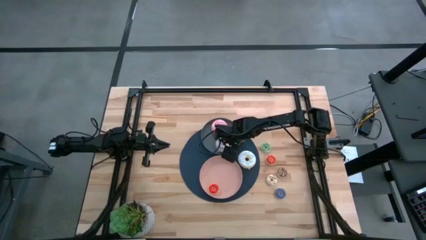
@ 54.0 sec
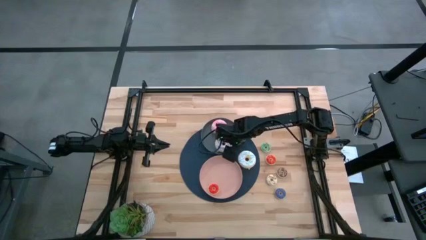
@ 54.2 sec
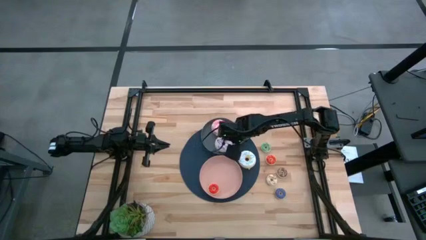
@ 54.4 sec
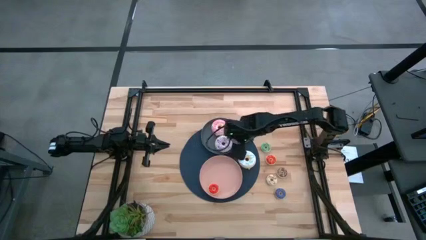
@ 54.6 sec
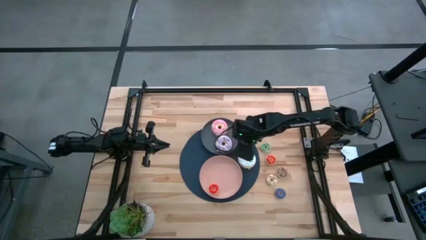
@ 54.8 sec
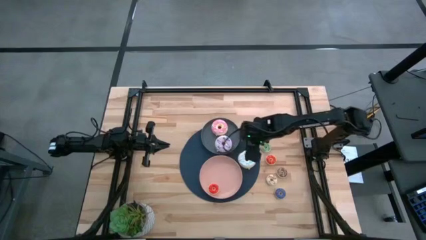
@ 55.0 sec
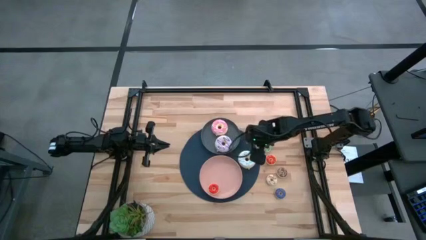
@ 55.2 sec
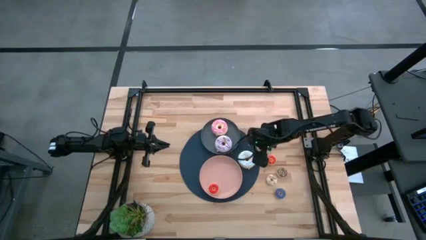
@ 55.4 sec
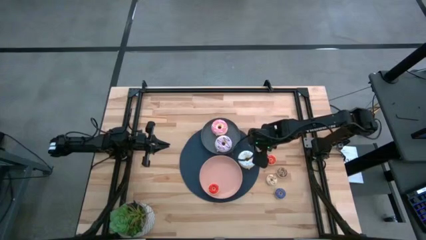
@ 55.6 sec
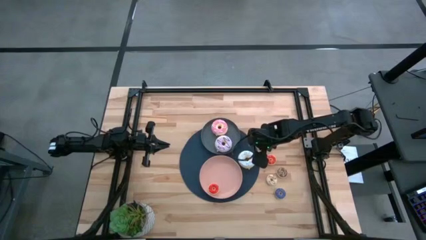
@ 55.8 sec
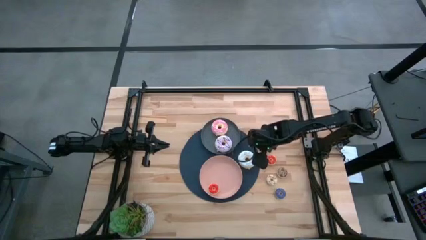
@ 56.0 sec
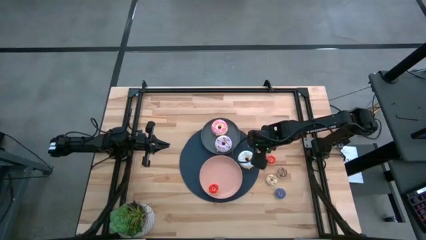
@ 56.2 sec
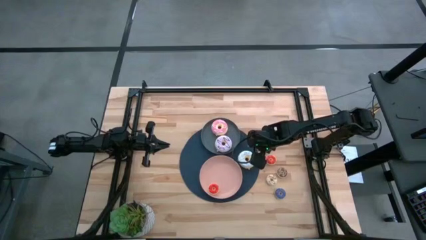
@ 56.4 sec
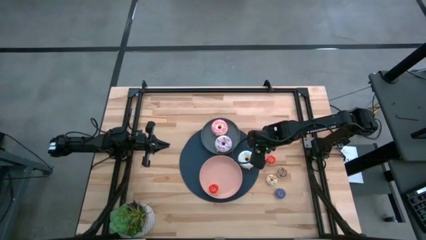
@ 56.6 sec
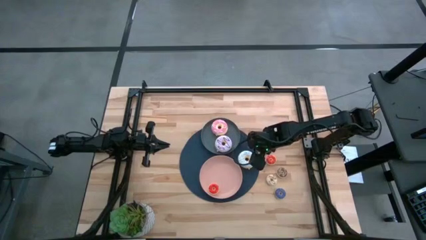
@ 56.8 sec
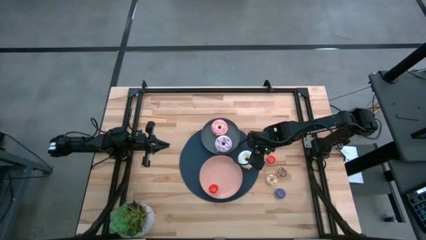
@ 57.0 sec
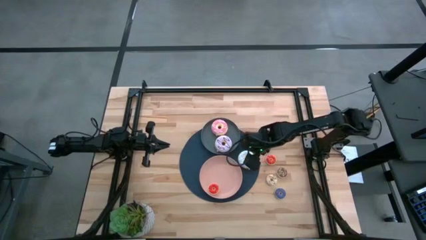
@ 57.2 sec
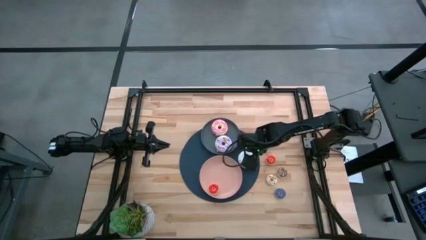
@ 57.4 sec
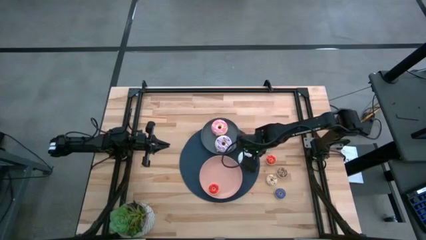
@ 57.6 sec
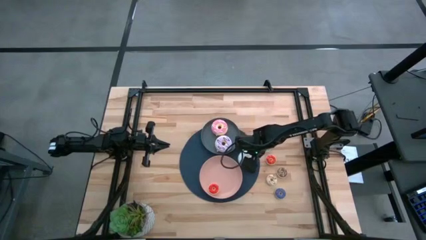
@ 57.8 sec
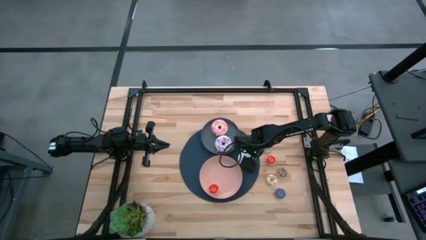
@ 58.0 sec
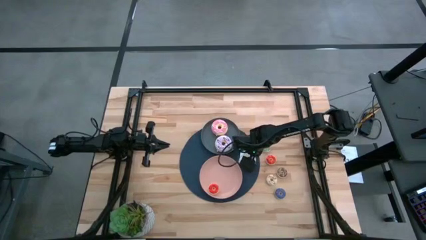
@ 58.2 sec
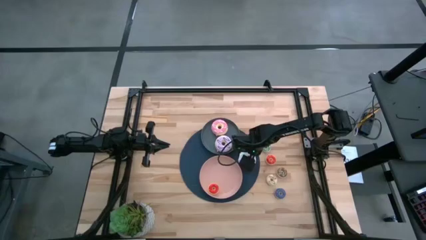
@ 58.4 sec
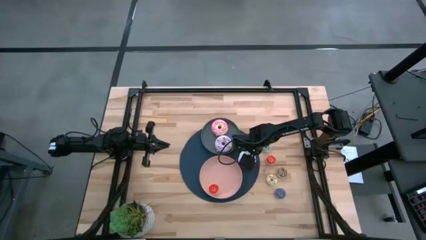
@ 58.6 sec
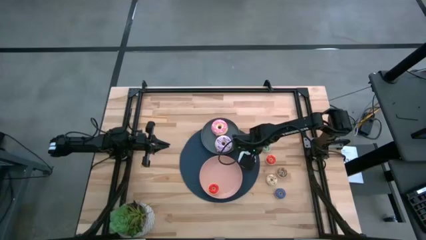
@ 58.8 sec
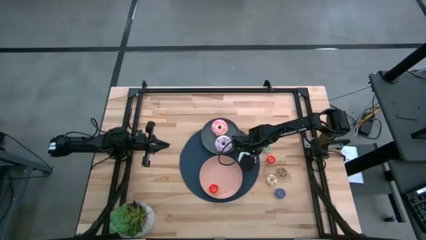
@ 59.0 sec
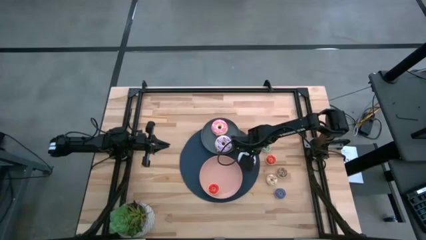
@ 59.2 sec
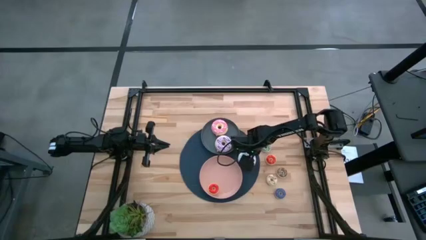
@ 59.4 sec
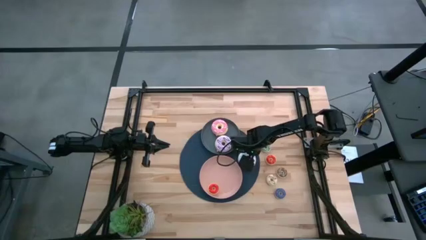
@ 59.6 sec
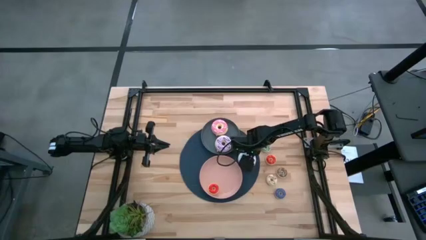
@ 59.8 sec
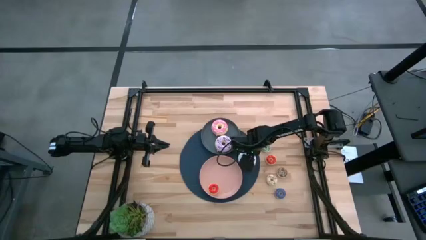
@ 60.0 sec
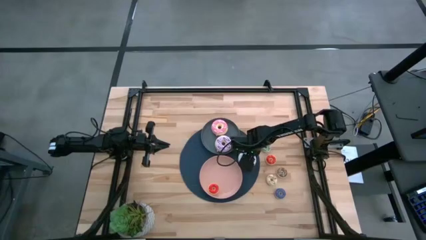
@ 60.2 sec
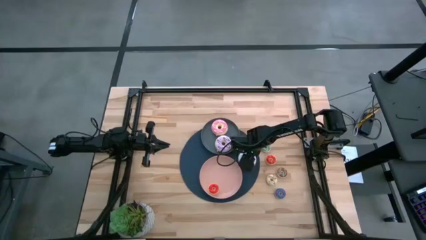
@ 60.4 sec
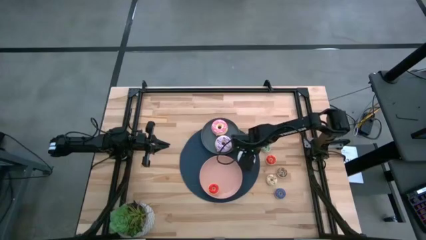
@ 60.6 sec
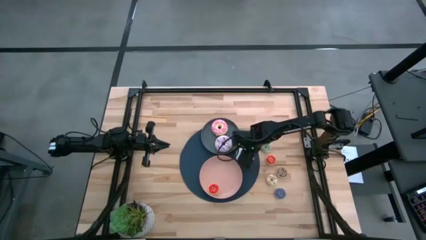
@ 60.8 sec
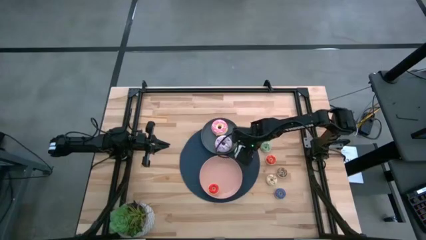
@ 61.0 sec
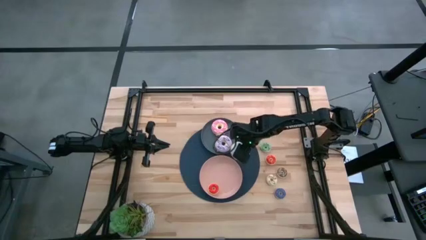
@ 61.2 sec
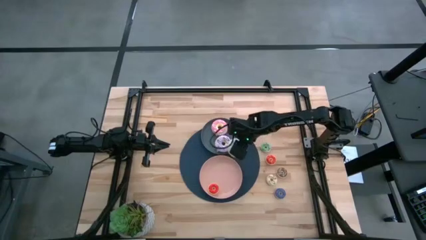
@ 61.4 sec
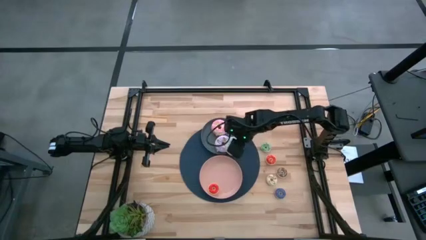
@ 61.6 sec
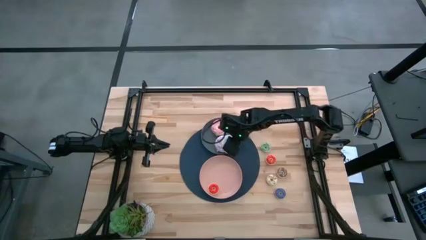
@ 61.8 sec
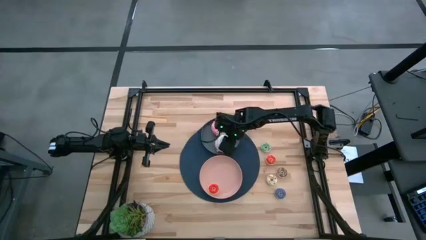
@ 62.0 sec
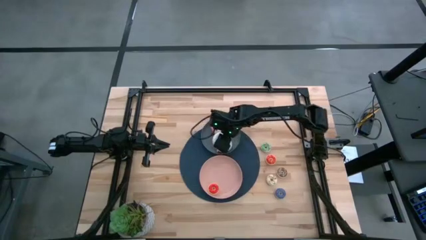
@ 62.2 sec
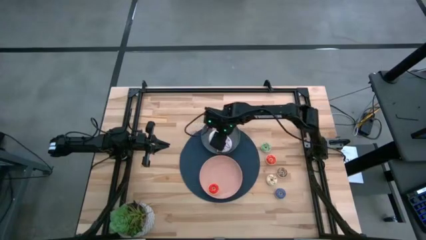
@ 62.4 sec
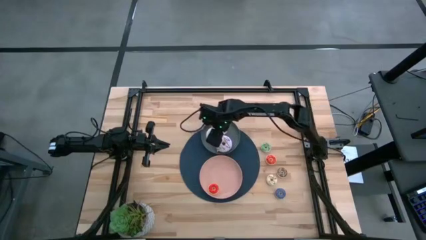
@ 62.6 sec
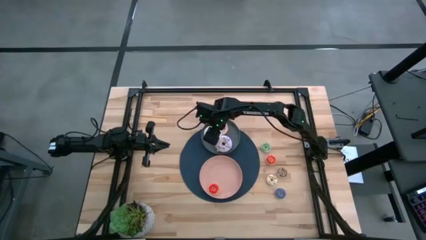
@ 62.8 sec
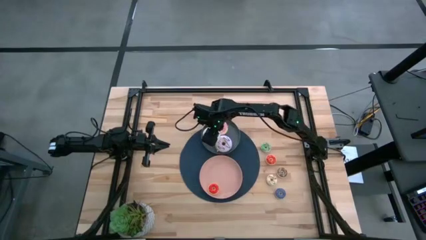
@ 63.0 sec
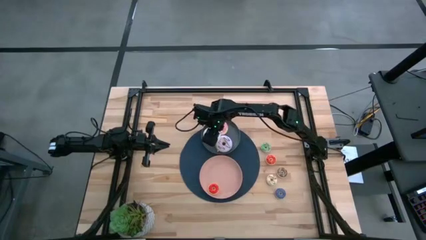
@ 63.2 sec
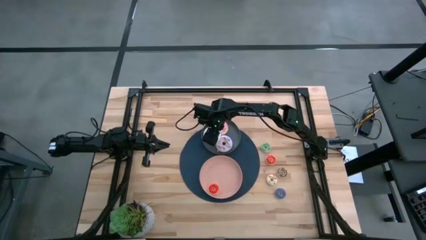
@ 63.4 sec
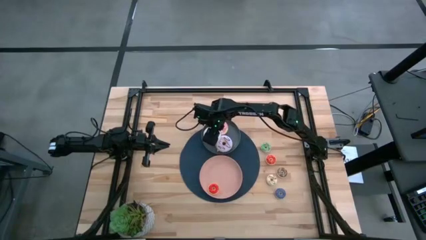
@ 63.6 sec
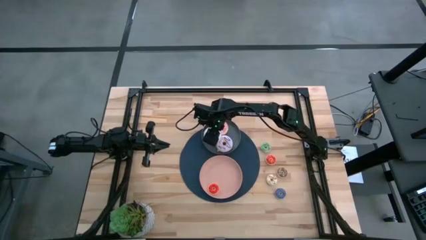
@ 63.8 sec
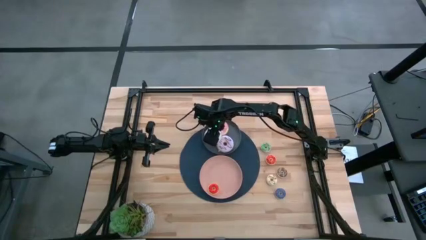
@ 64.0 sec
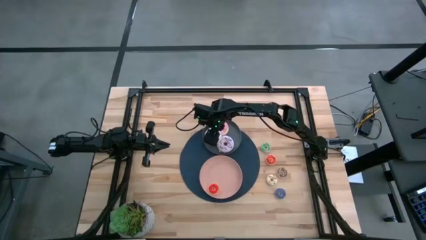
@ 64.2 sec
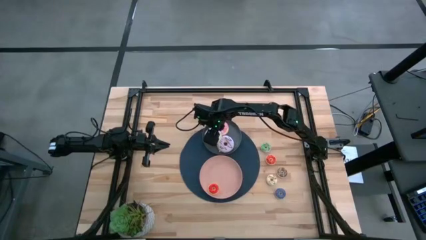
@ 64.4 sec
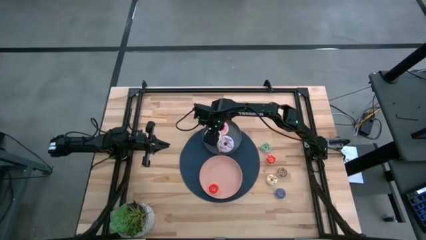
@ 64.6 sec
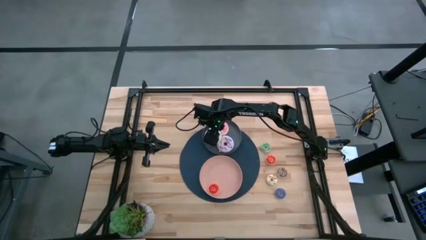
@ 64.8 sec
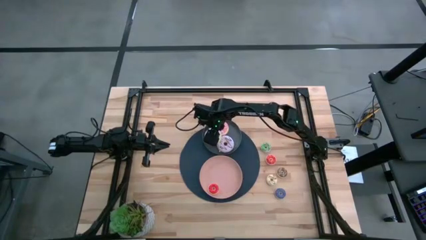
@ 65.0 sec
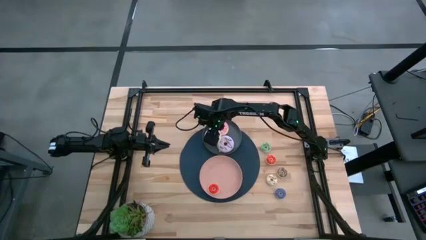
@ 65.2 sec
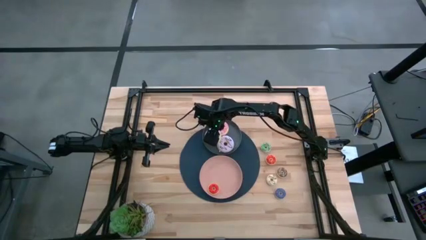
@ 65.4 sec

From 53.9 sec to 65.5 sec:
Task: Pick & Place donuts
Put the big white doughnut into the gray plate

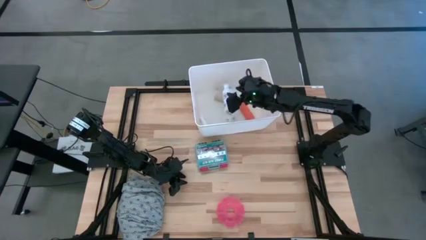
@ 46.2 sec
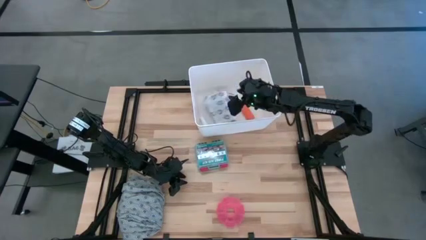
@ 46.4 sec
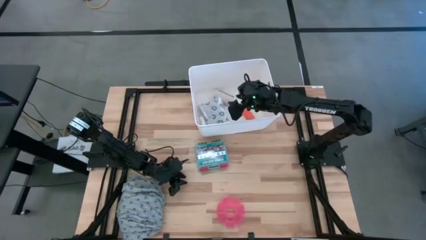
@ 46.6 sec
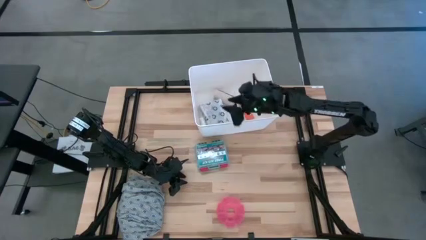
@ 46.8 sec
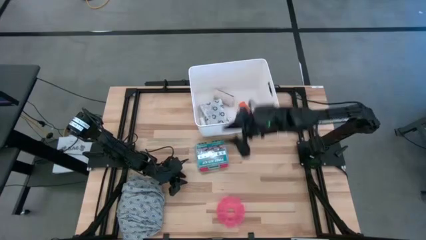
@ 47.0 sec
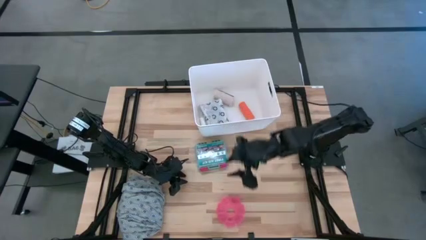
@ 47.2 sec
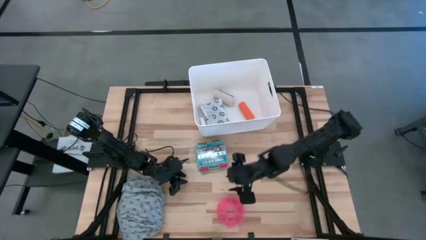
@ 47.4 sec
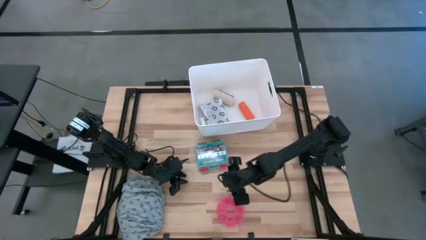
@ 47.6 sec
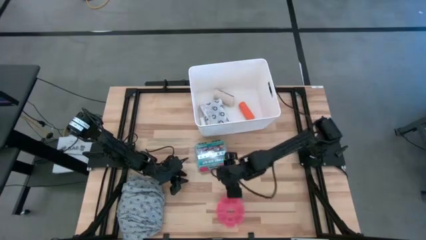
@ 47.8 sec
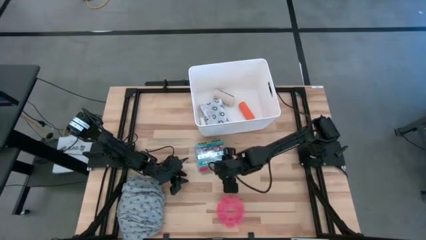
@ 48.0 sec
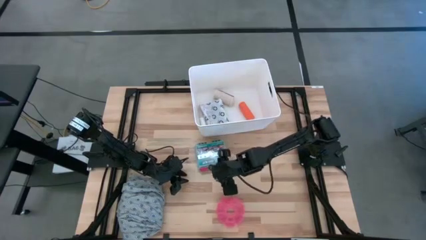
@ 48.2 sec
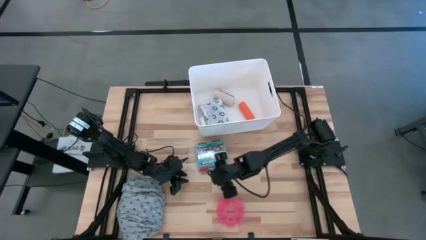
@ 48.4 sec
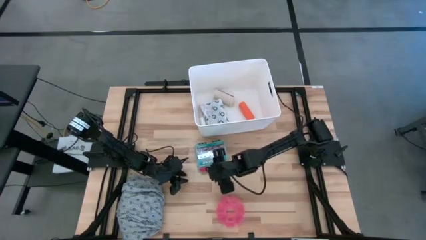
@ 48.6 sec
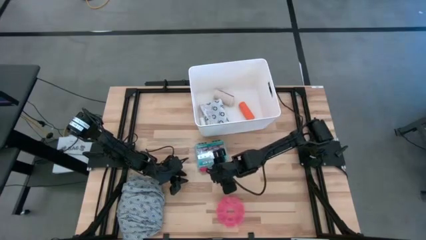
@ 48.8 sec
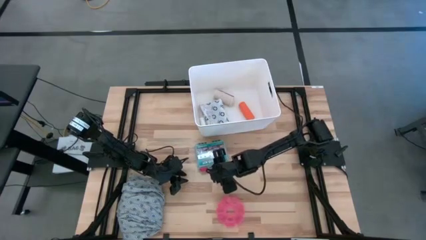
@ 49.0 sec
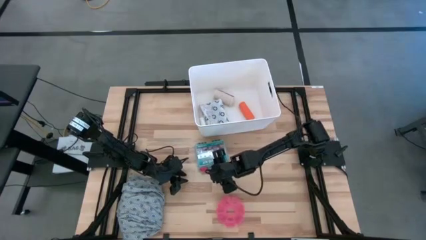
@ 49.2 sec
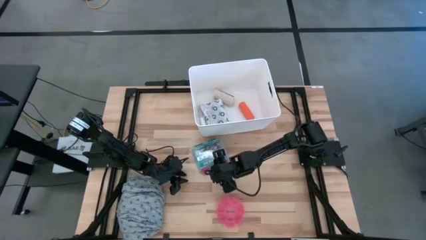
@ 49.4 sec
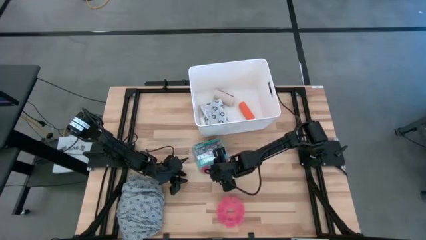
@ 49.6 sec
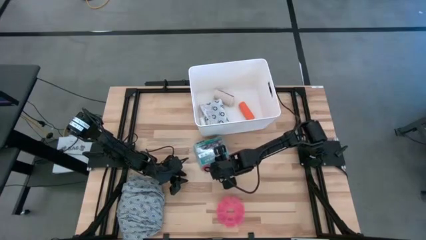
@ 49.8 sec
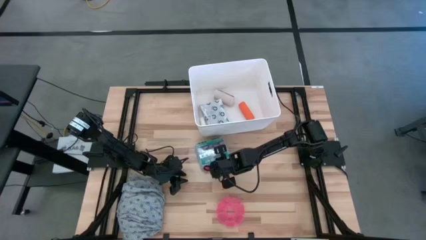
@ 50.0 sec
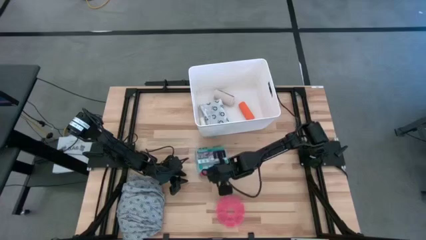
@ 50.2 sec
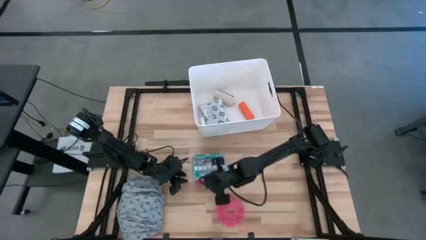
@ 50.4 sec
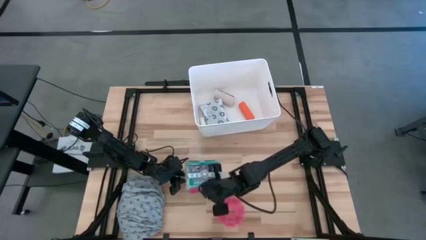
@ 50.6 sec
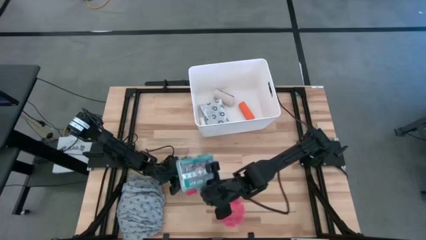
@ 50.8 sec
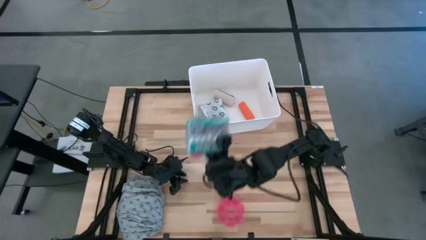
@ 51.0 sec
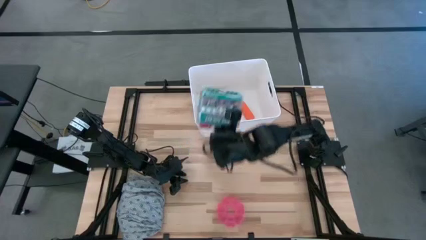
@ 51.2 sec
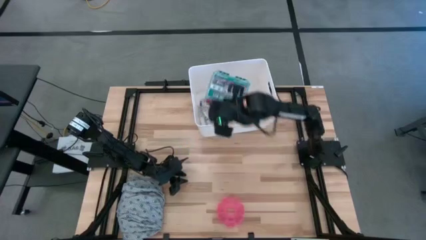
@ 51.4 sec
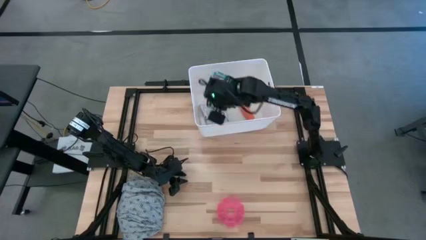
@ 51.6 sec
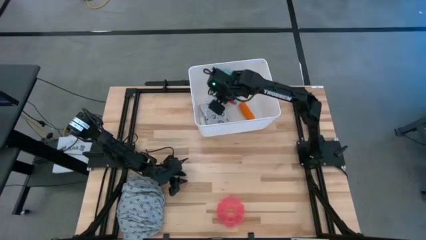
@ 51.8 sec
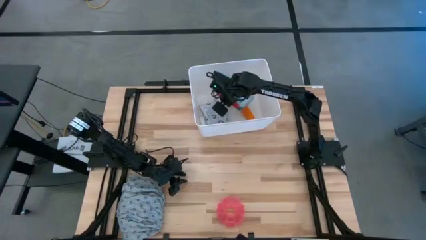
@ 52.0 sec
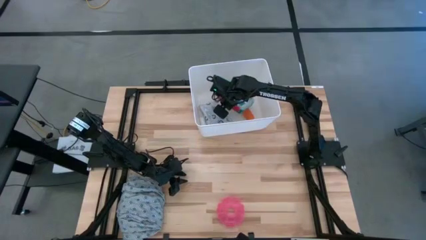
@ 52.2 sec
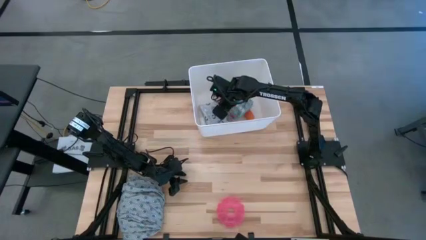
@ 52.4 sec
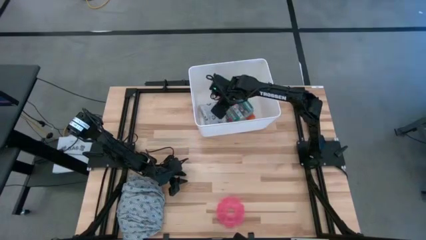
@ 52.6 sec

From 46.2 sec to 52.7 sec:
Task: Pick & place medical supplies in basket/bin
Put the first aid kit into the white bin
